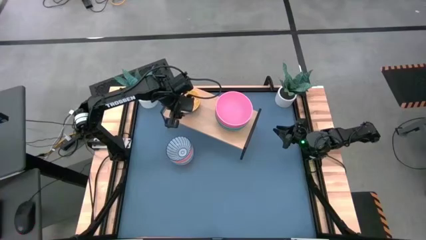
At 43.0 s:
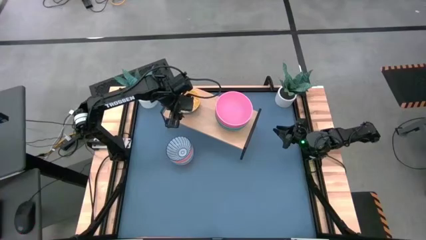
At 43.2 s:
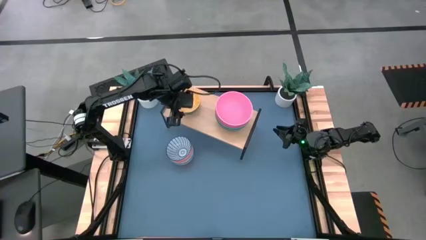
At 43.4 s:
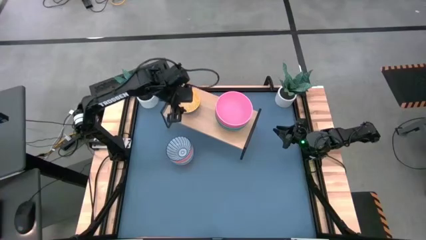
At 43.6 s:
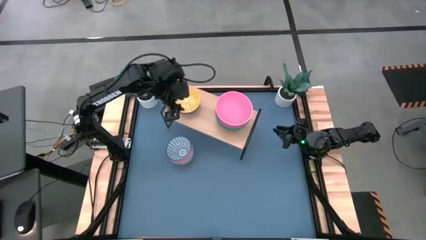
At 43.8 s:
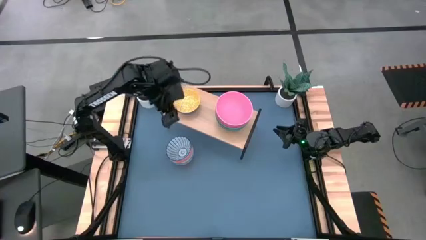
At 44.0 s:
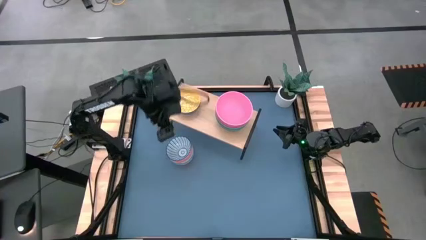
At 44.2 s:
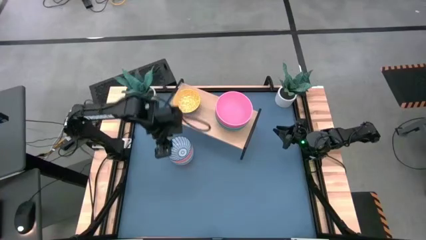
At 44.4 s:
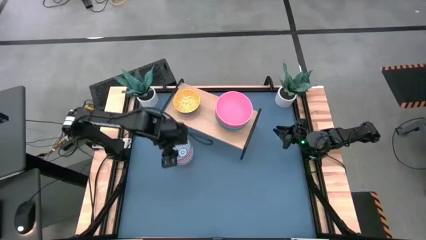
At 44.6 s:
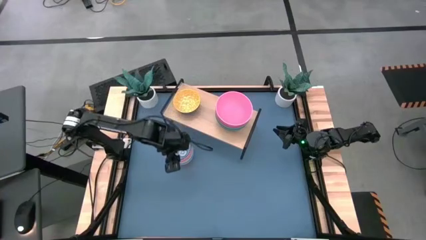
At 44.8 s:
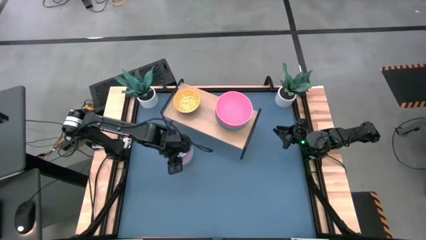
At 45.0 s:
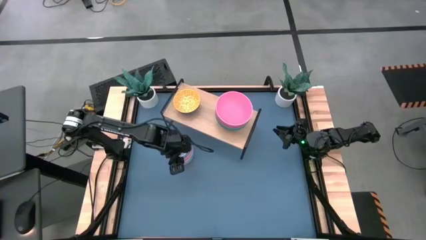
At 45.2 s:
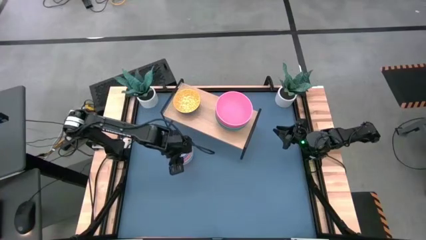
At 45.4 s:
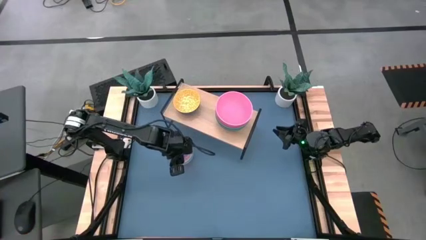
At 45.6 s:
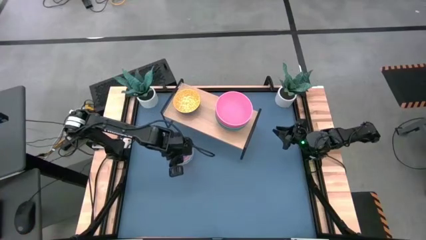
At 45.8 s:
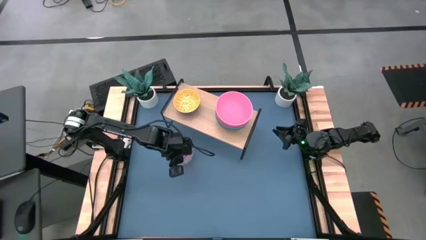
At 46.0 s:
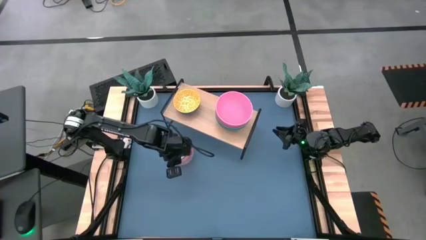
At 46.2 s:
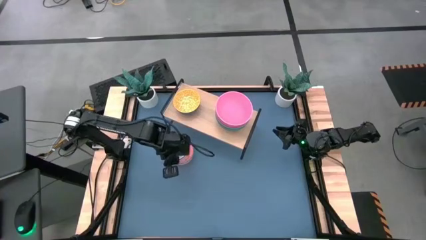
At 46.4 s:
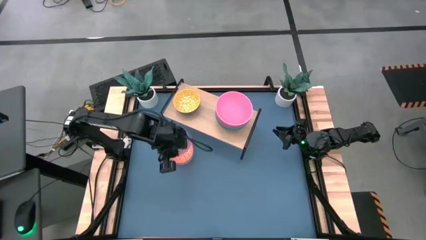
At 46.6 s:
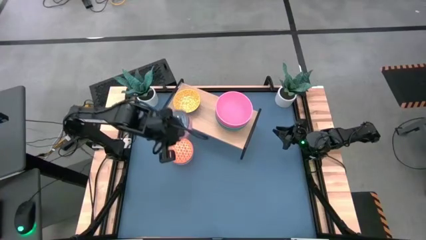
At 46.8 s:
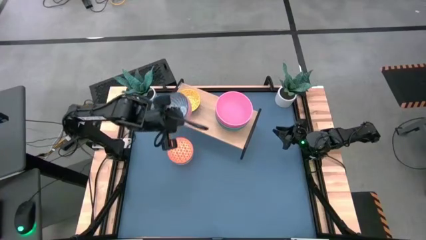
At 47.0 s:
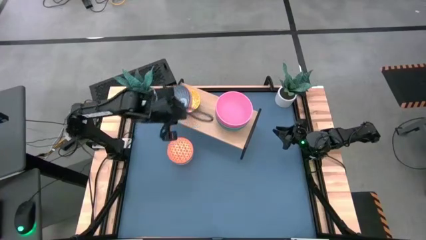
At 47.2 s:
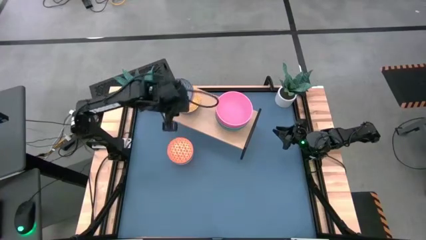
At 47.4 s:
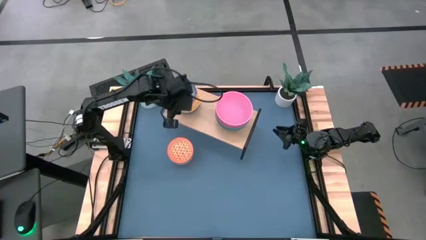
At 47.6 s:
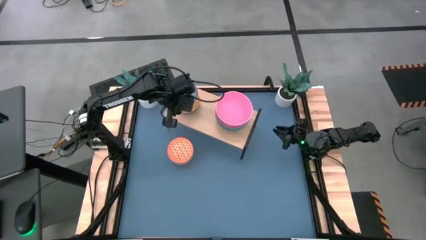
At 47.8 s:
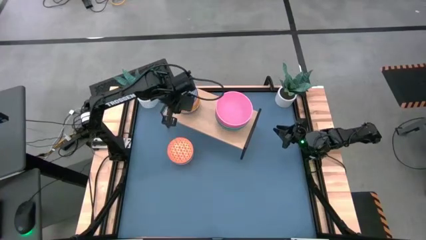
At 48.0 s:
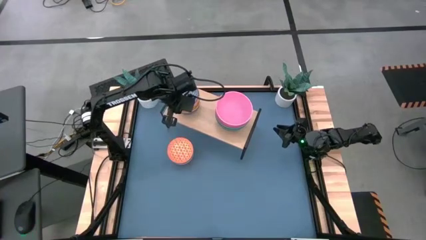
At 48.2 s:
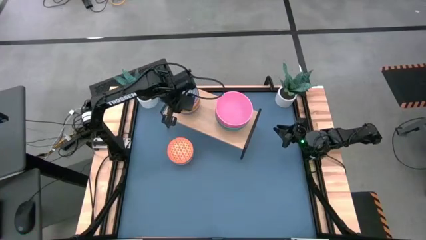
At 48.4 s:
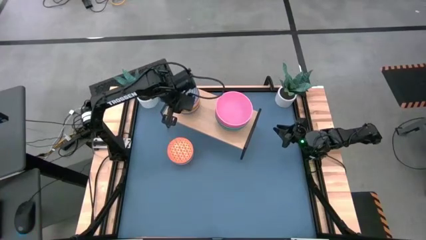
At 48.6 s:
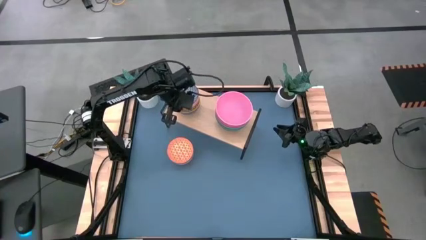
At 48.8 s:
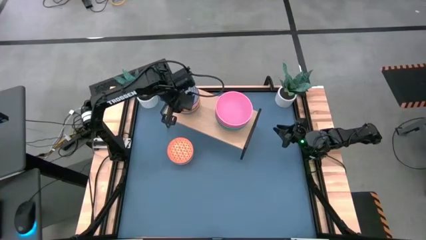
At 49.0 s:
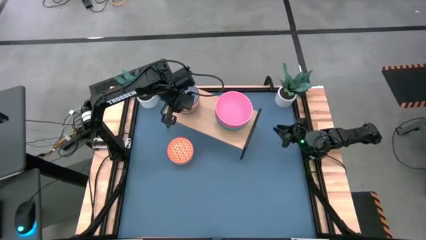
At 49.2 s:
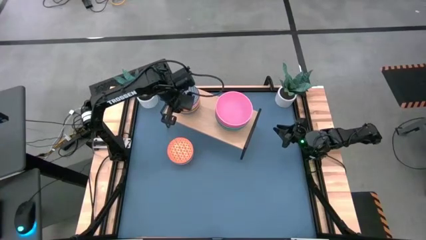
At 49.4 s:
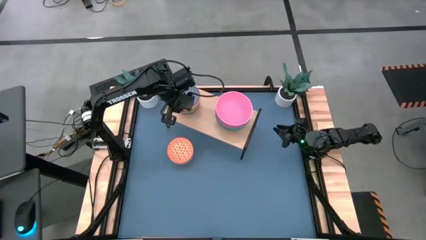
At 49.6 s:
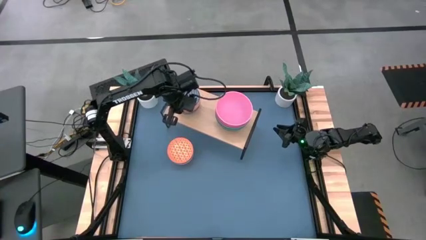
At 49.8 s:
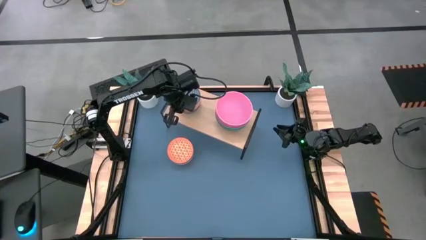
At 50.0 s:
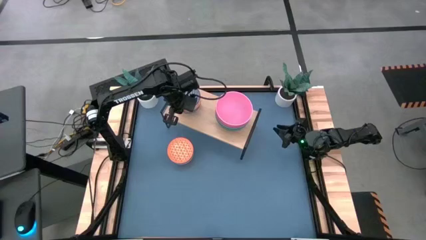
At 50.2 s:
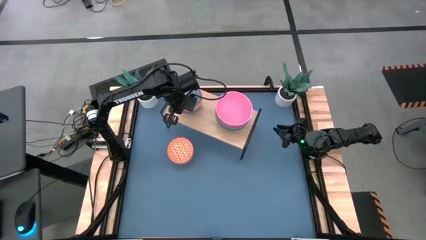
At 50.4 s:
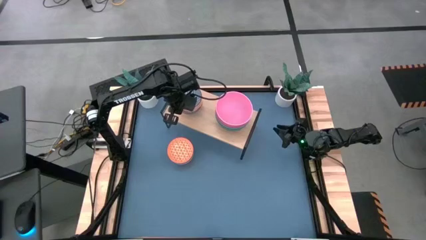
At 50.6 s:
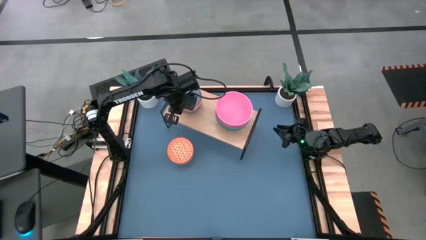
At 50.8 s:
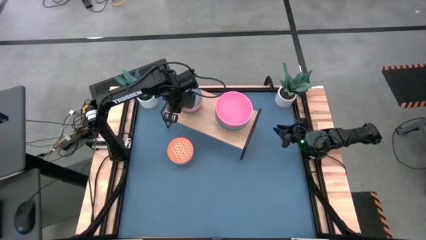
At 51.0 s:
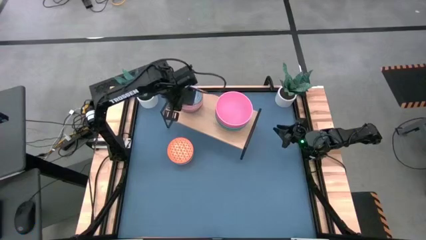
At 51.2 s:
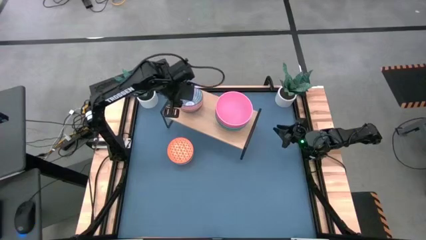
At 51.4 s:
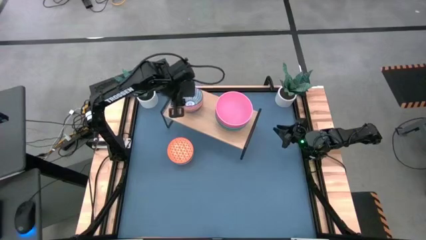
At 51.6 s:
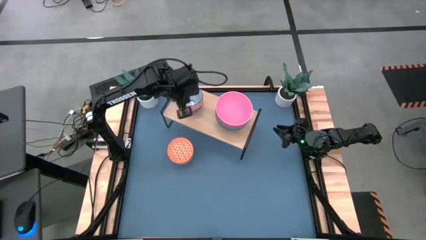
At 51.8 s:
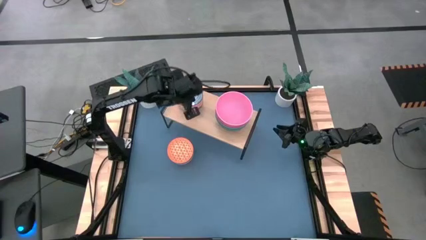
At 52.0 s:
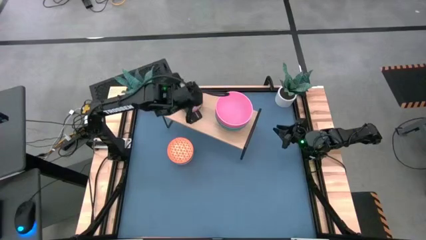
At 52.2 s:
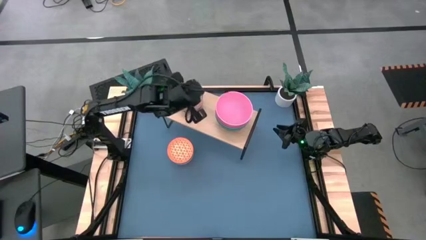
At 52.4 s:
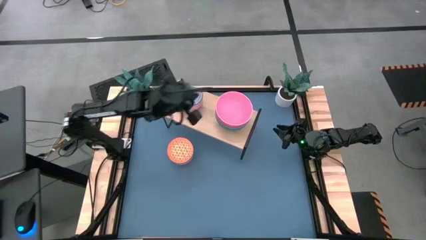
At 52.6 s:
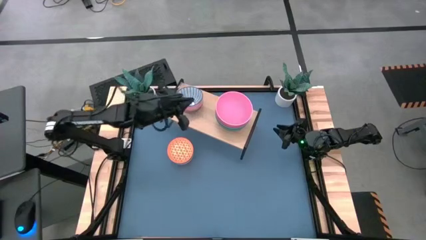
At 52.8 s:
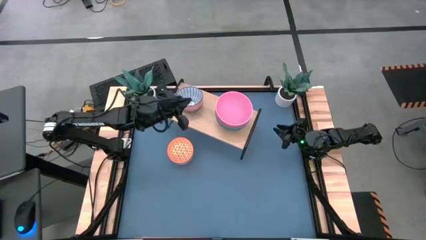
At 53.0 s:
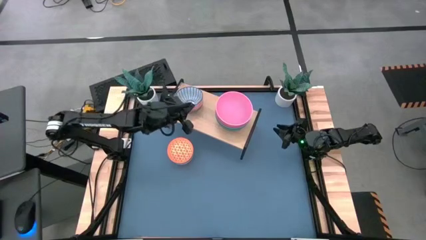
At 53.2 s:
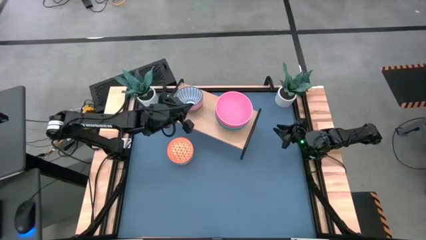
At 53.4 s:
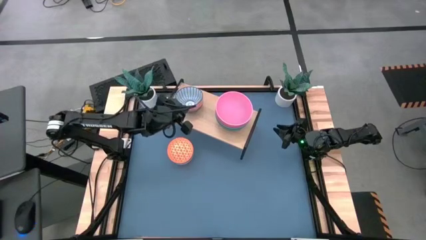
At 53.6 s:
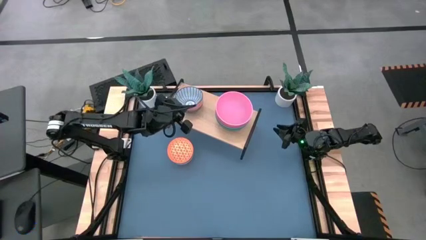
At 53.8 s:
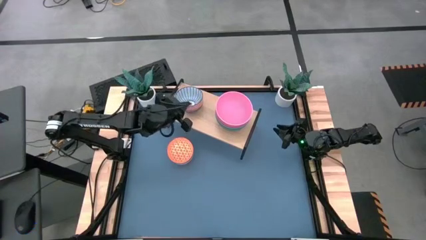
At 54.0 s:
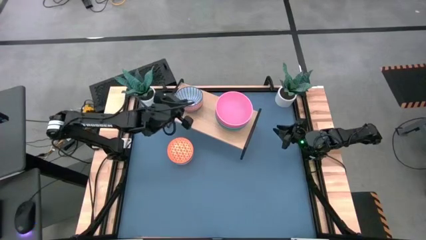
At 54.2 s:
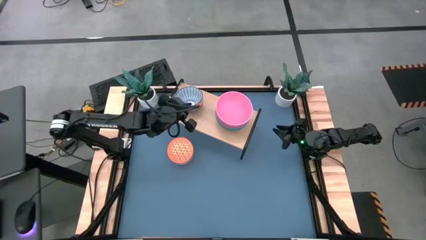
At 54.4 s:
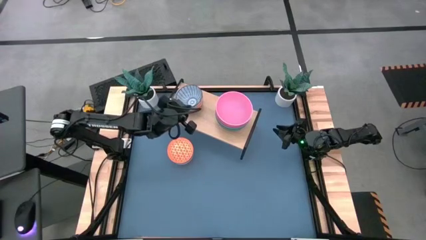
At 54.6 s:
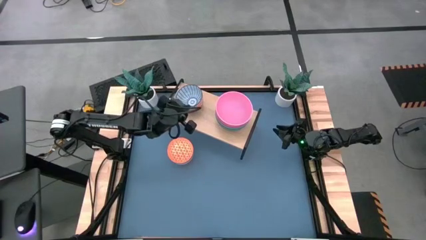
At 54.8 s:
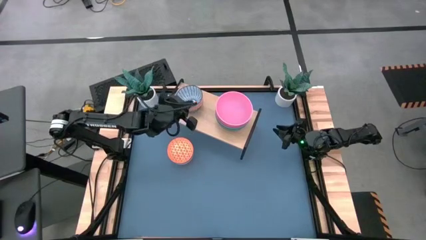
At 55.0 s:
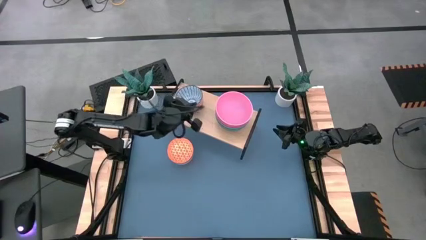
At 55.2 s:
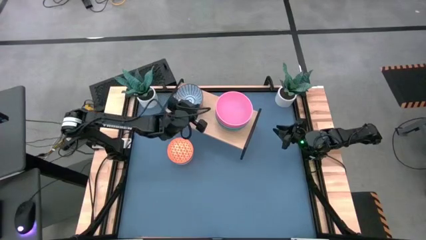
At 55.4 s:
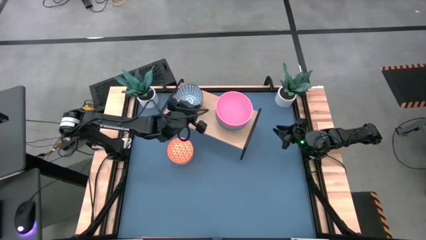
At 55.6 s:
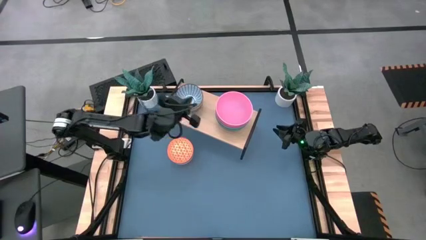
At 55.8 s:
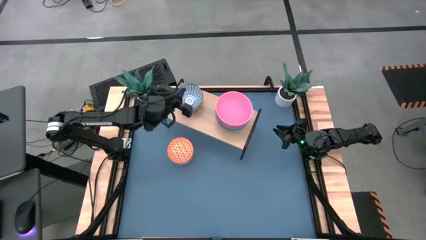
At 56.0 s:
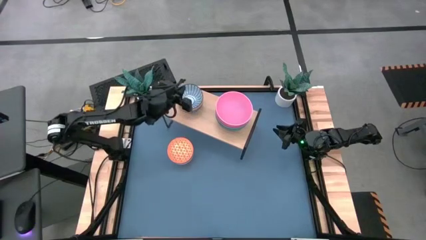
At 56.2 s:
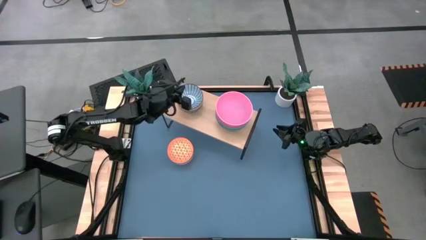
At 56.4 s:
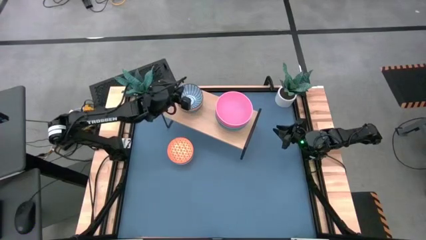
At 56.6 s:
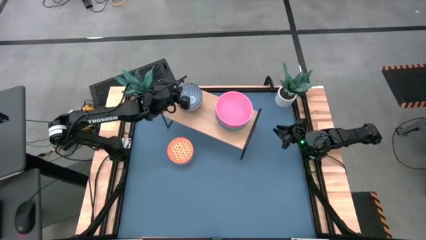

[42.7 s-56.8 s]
Task: Place and stack bowls onto a shelf
Stack the printed blue bowl onto the yellow bowl on the shelf
